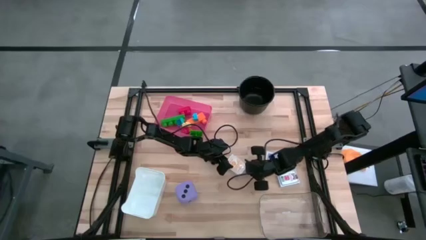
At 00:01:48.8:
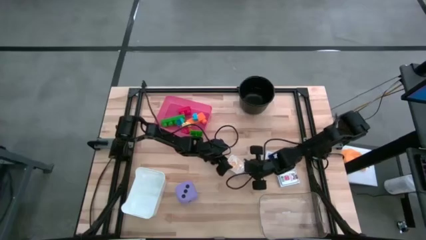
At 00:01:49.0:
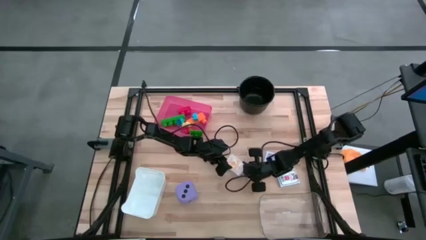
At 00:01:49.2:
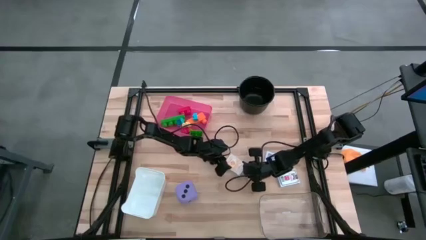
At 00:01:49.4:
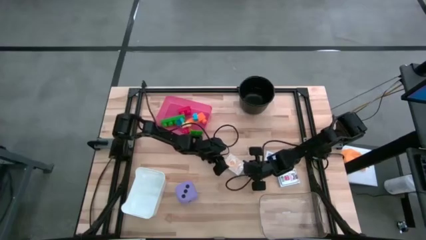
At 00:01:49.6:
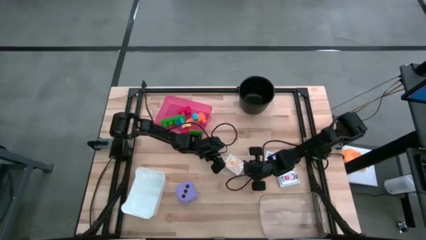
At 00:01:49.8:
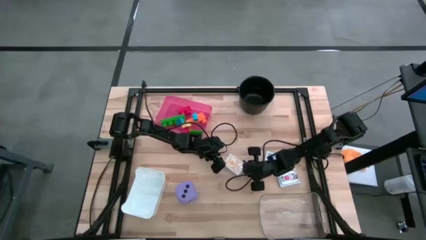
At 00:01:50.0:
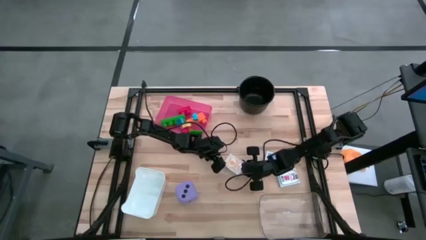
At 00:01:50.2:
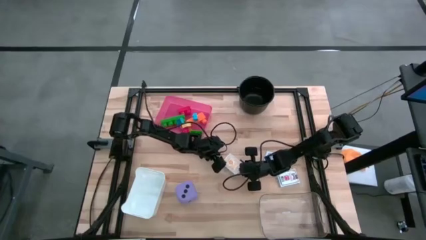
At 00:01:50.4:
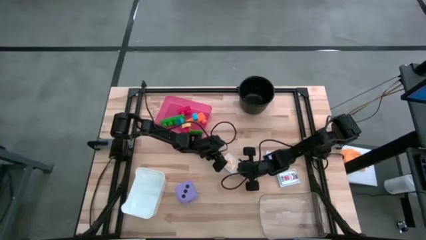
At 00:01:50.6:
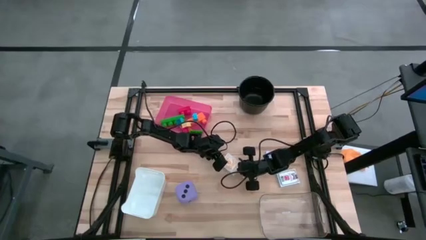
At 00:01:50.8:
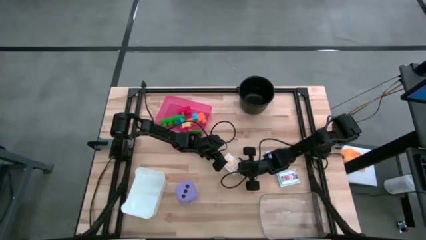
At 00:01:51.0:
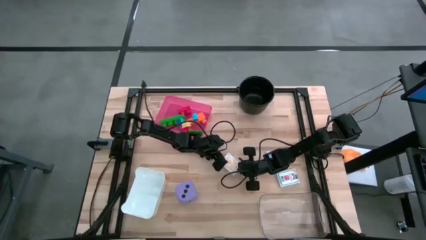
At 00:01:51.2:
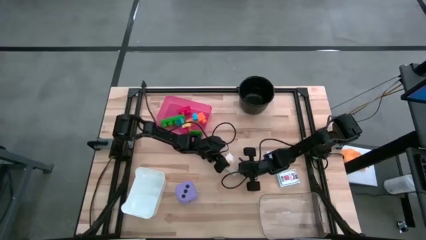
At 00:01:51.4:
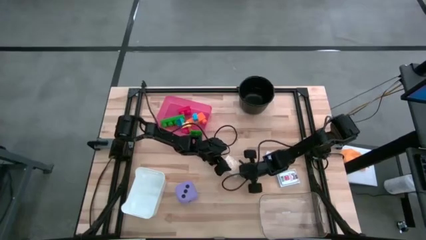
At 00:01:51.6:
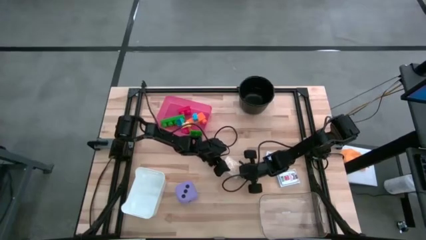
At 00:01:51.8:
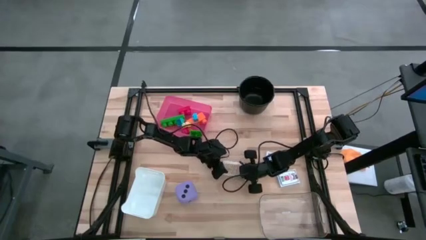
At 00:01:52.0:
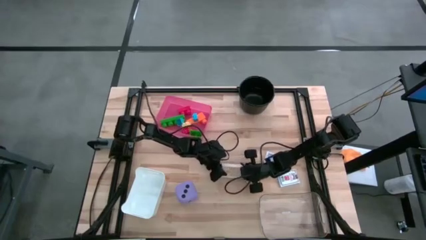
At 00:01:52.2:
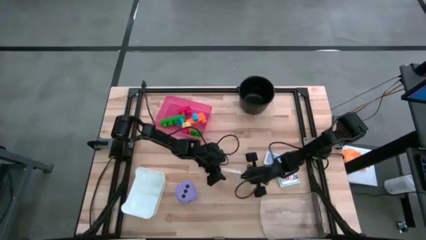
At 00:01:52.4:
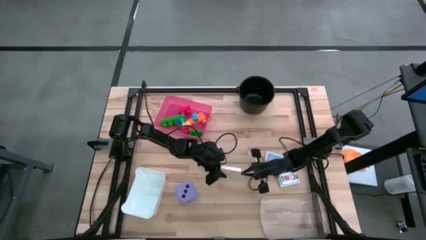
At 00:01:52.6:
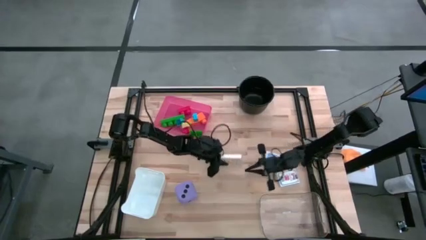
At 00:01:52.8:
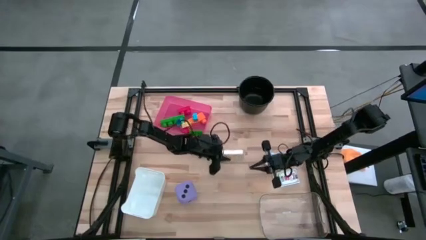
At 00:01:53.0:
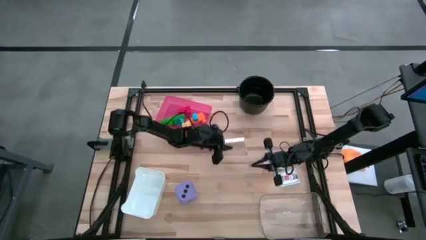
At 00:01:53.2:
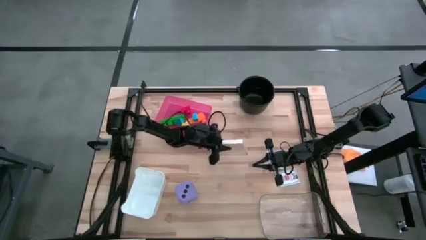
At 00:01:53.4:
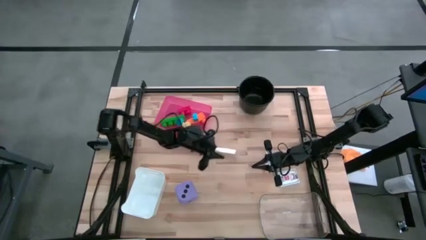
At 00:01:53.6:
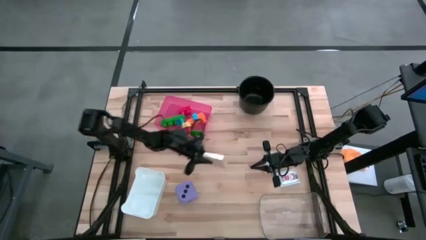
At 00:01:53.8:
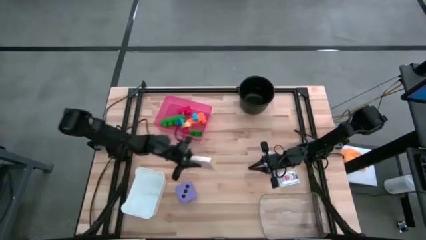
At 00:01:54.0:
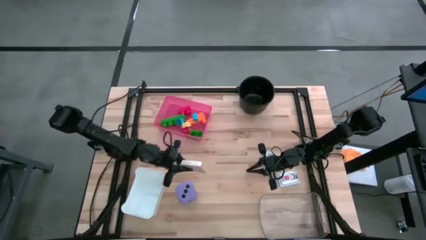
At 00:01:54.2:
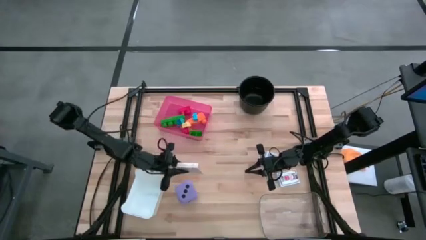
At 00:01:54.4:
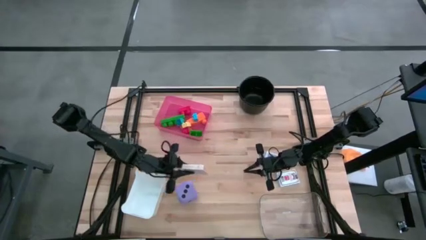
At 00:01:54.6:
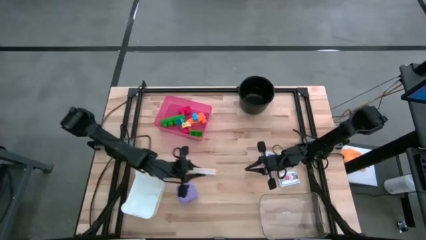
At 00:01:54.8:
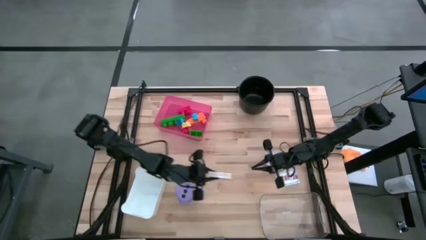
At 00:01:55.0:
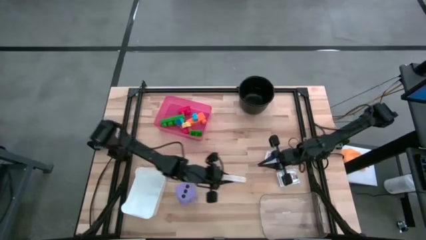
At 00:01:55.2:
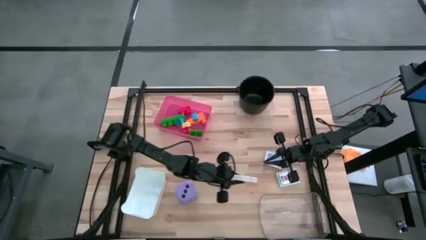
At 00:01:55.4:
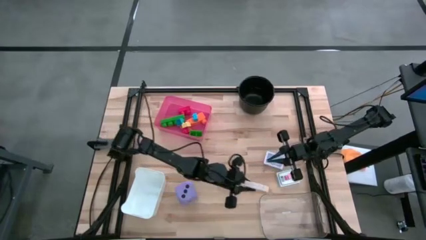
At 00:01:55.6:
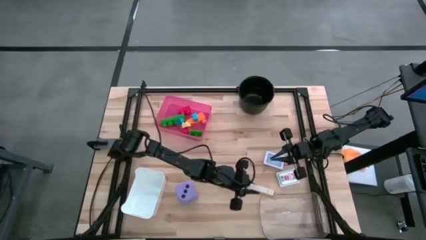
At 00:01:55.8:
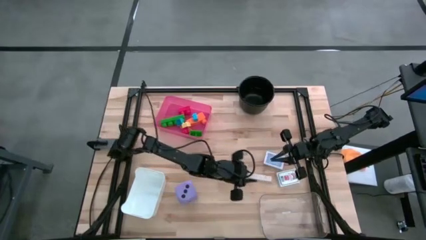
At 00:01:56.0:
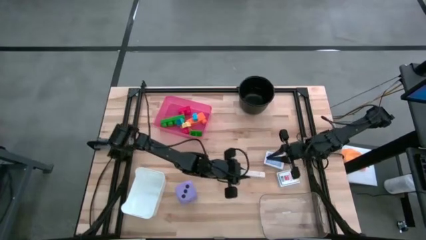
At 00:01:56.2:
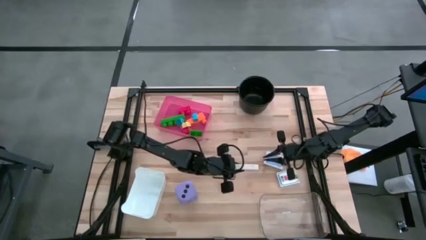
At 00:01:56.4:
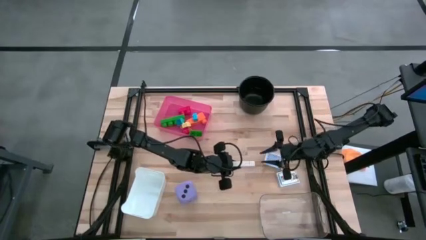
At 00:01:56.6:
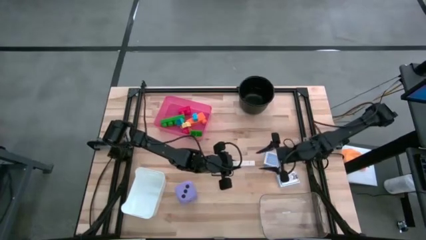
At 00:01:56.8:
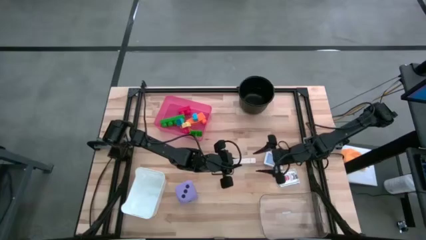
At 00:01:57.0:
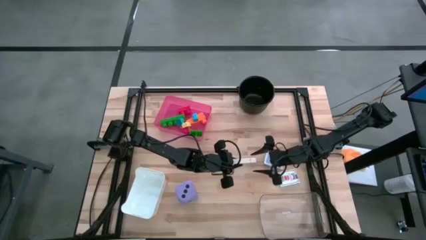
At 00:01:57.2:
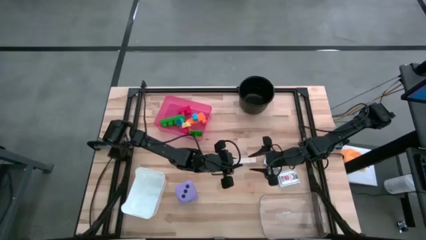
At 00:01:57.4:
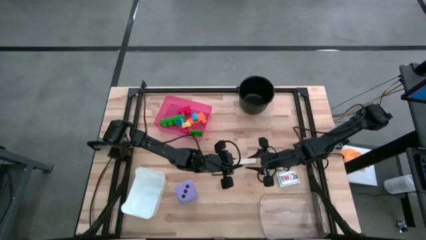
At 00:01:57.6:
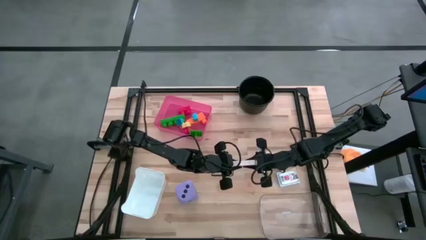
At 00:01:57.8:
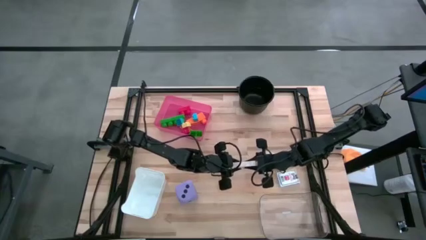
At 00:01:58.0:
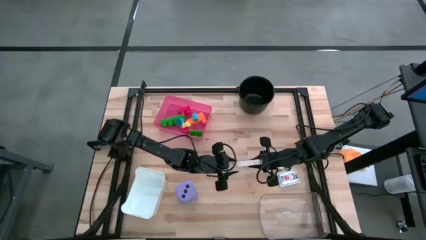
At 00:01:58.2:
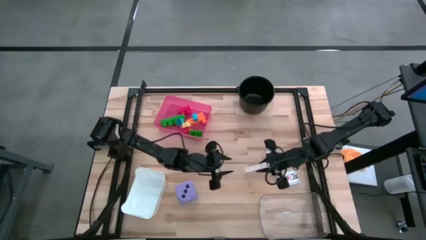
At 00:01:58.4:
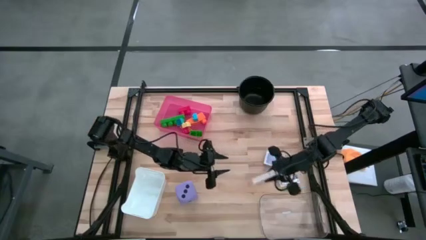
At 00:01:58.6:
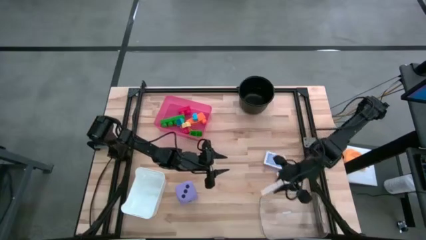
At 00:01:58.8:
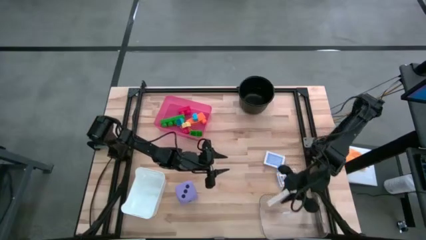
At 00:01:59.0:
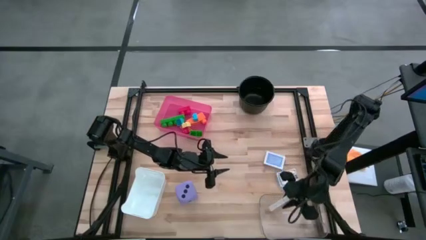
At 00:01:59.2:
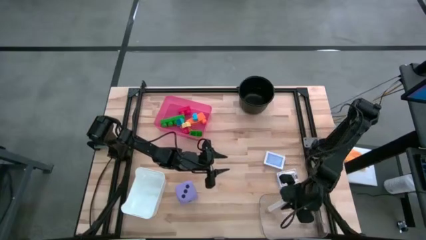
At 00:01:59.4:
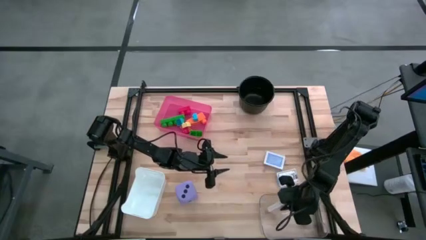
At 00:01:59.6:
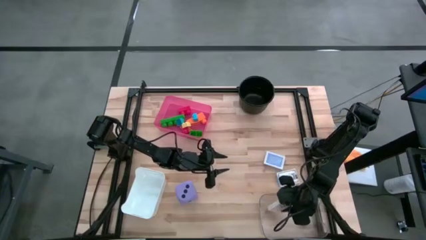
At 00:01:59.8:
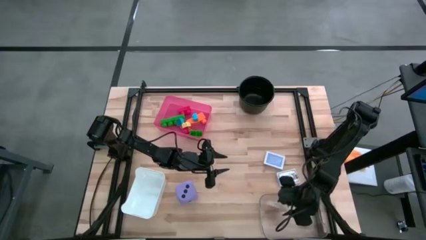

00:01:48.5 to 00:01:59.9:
Task: Pick & Place Toys
Put the yellow deck of cards into the transparent bin
